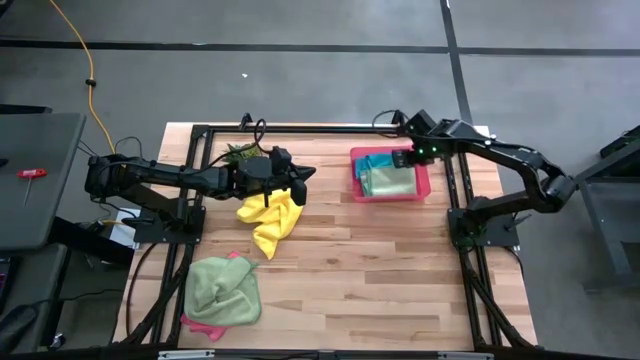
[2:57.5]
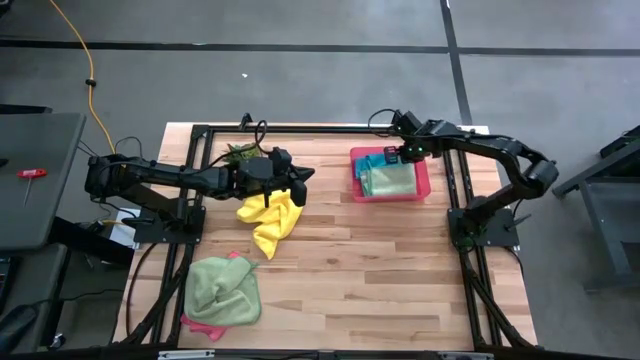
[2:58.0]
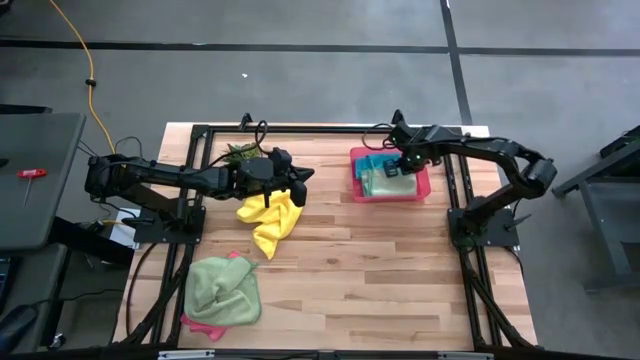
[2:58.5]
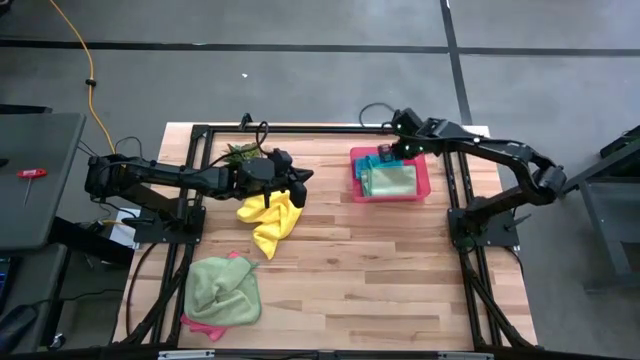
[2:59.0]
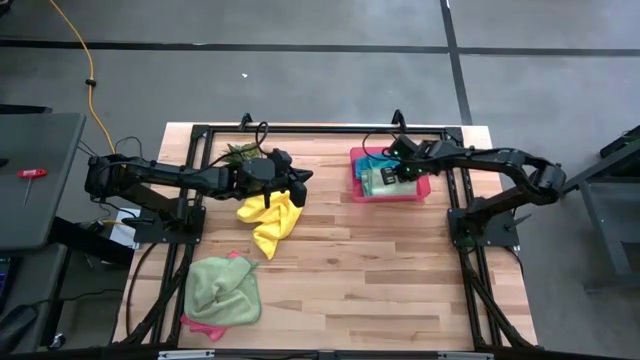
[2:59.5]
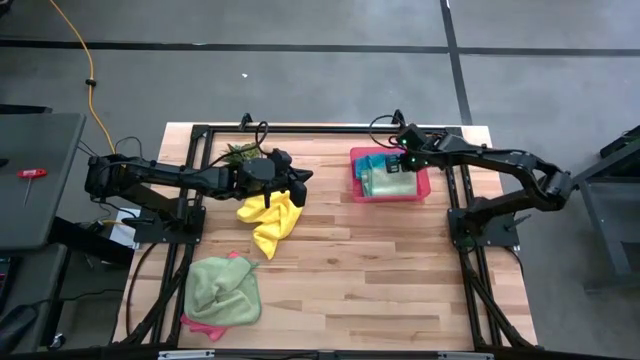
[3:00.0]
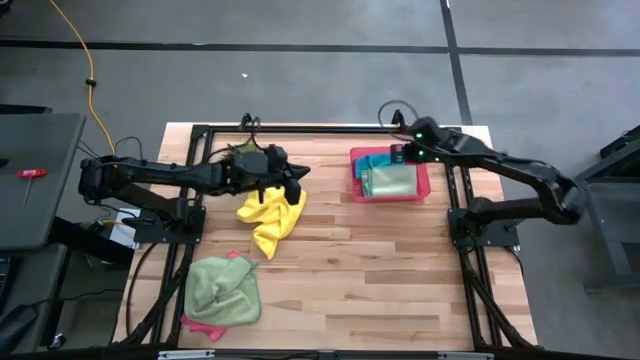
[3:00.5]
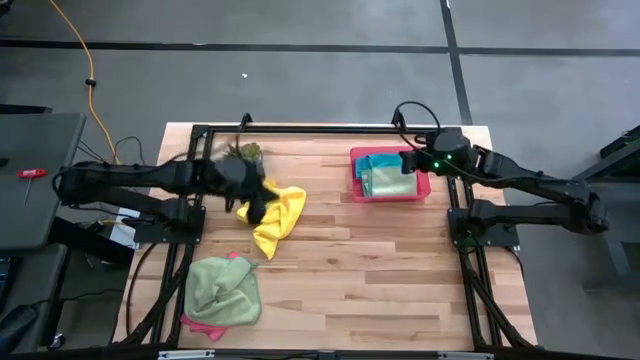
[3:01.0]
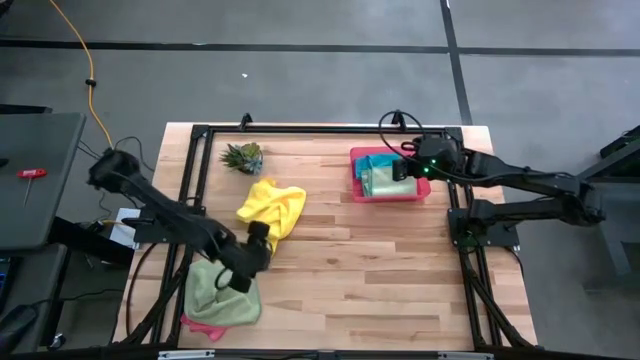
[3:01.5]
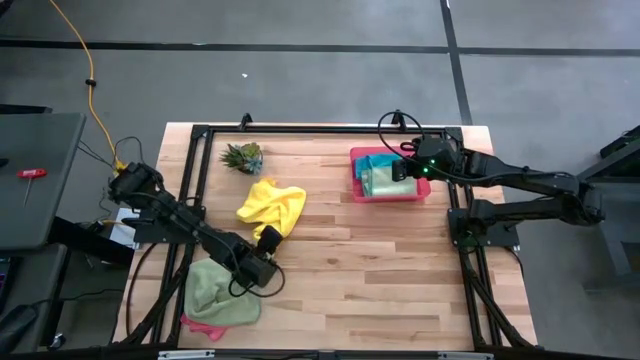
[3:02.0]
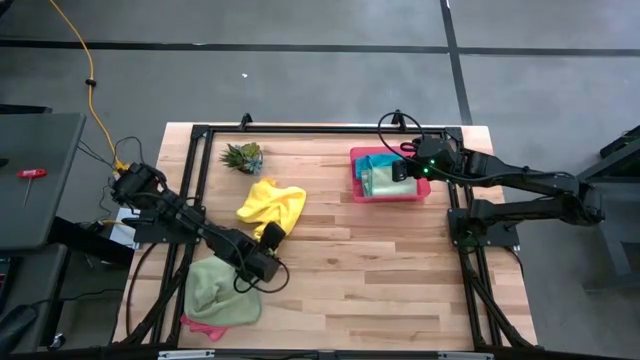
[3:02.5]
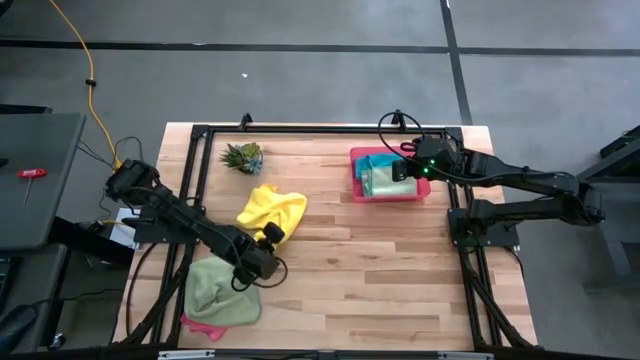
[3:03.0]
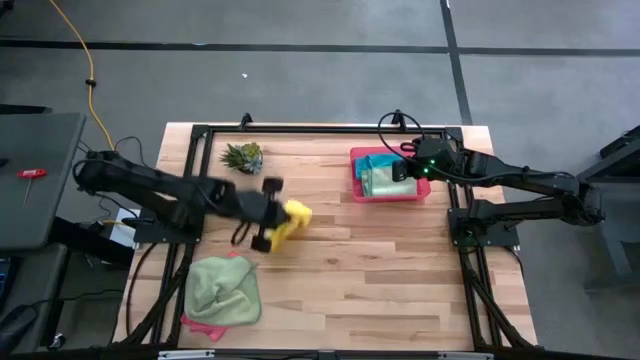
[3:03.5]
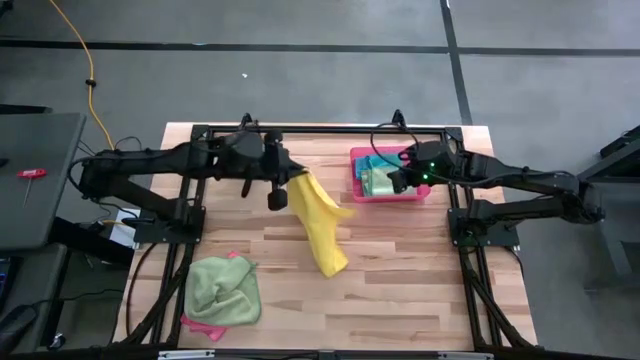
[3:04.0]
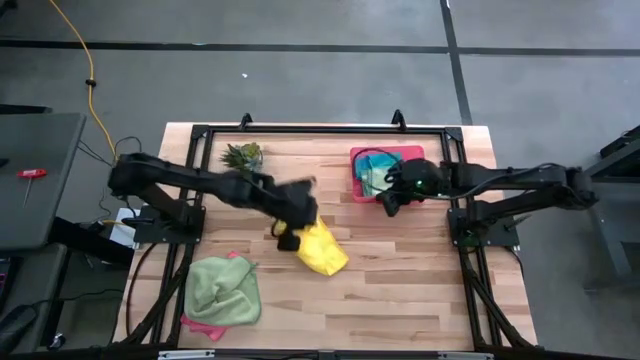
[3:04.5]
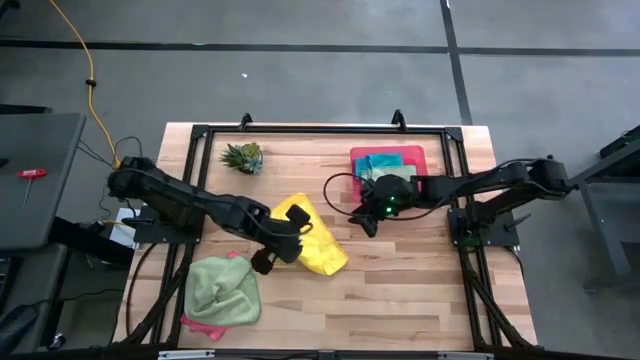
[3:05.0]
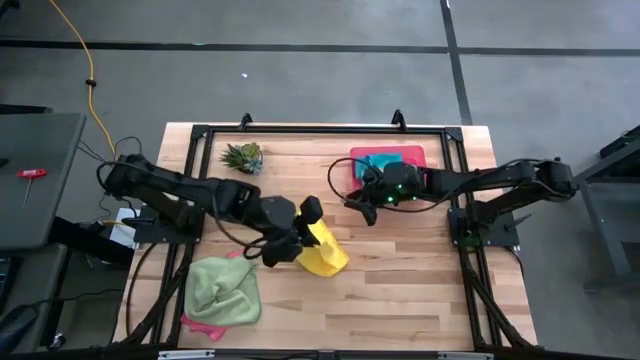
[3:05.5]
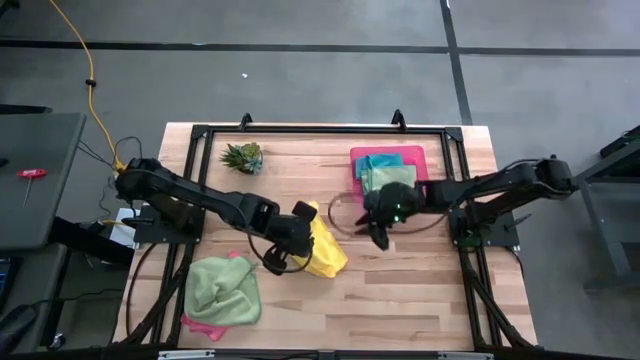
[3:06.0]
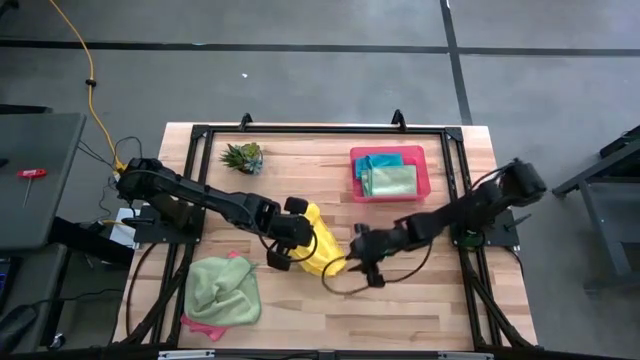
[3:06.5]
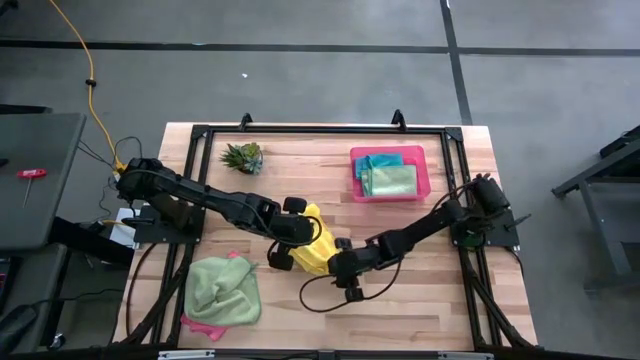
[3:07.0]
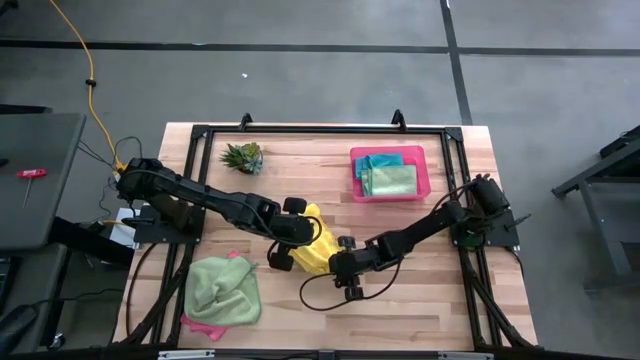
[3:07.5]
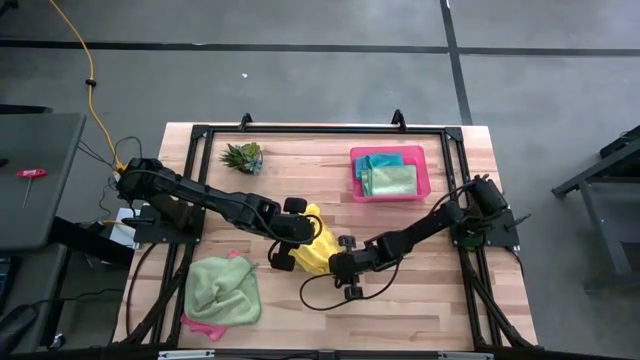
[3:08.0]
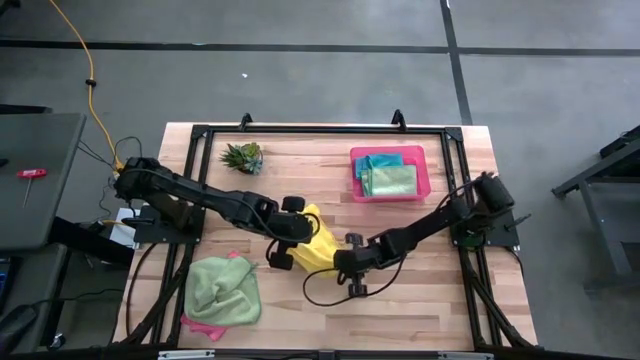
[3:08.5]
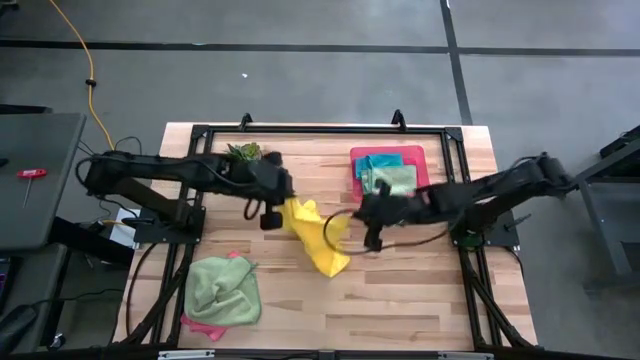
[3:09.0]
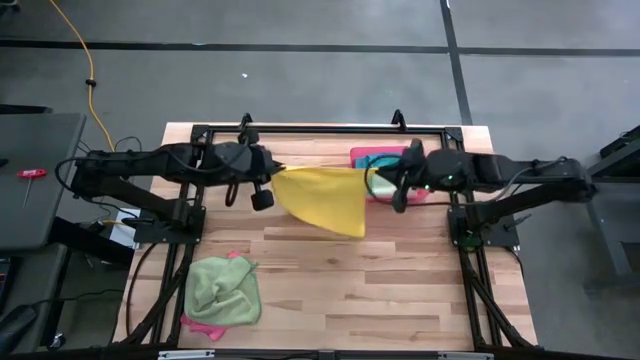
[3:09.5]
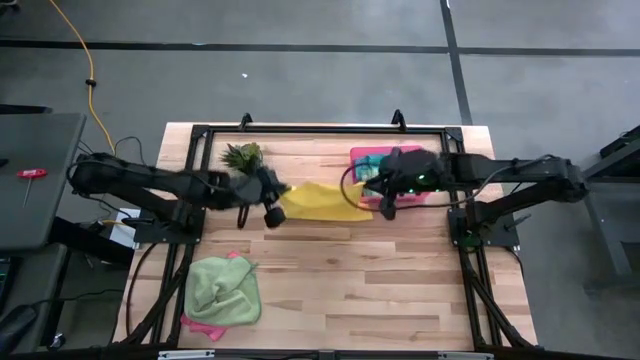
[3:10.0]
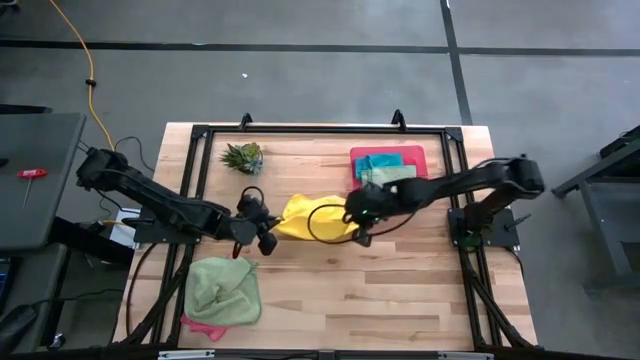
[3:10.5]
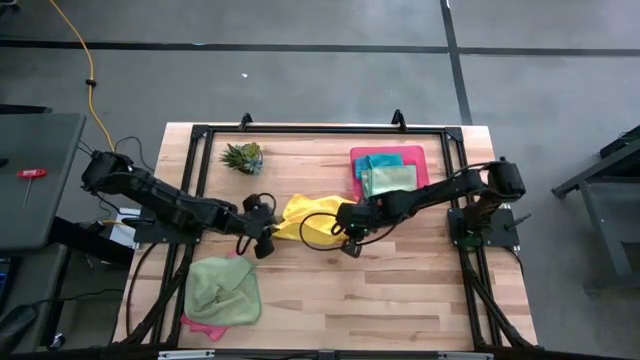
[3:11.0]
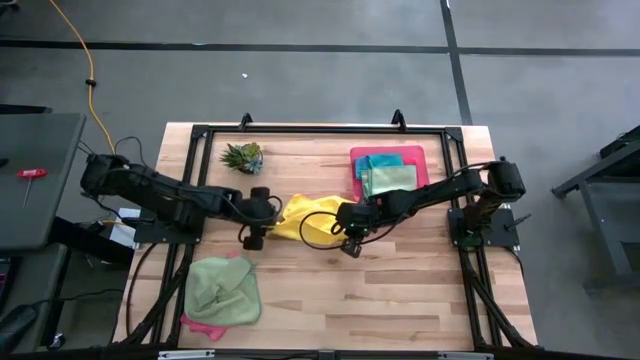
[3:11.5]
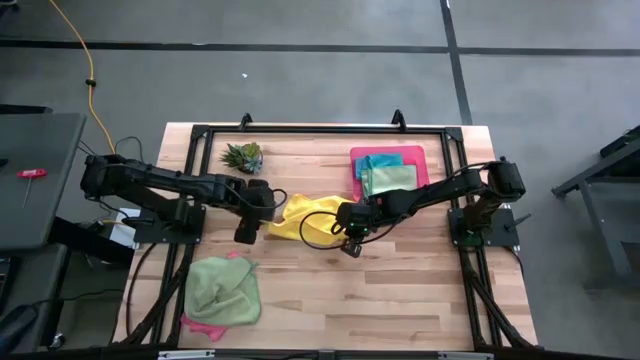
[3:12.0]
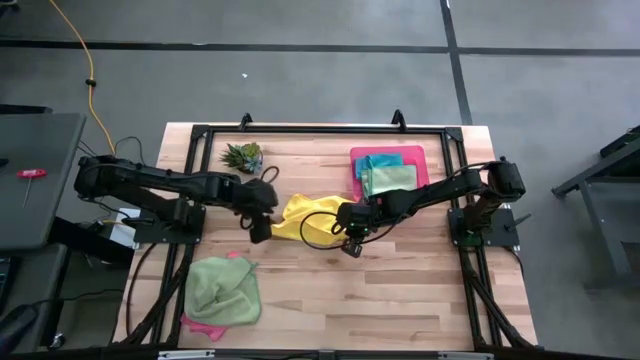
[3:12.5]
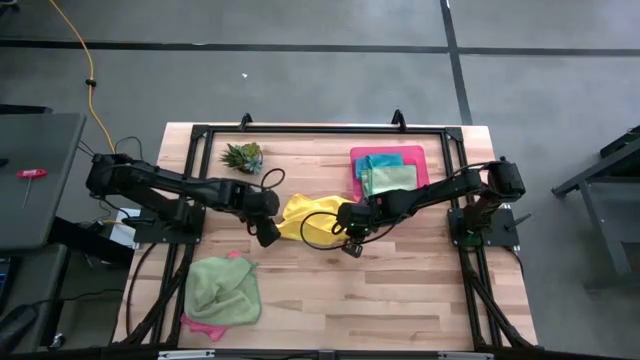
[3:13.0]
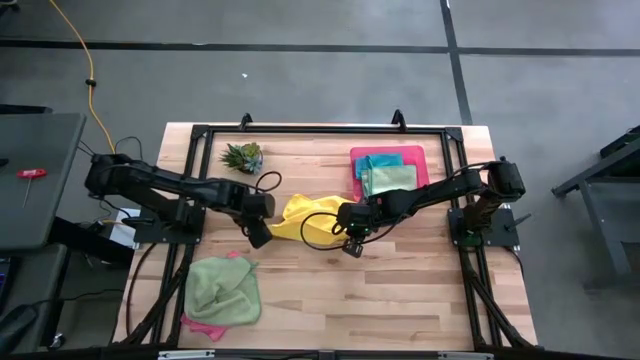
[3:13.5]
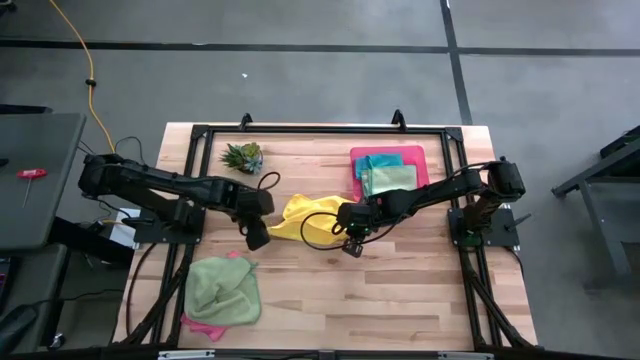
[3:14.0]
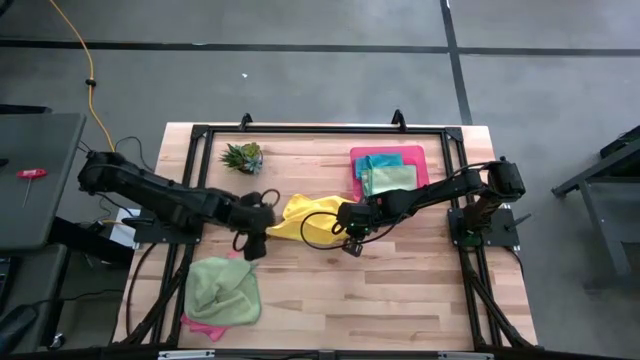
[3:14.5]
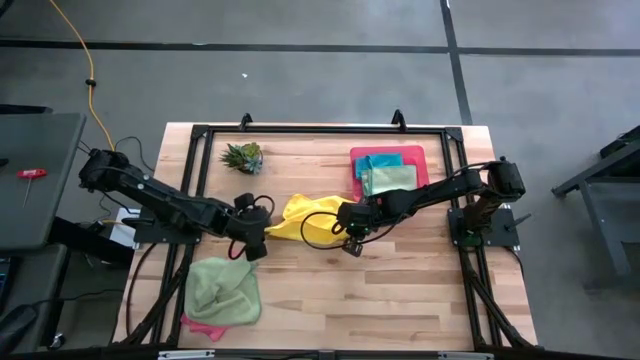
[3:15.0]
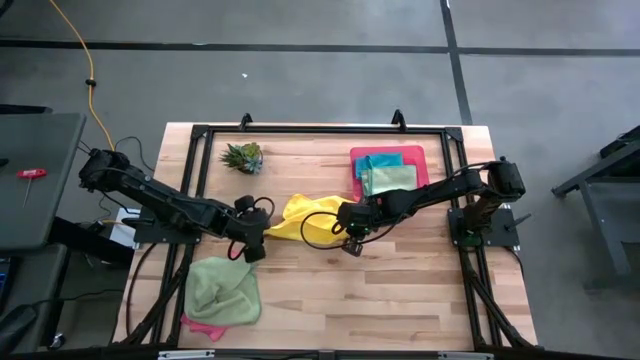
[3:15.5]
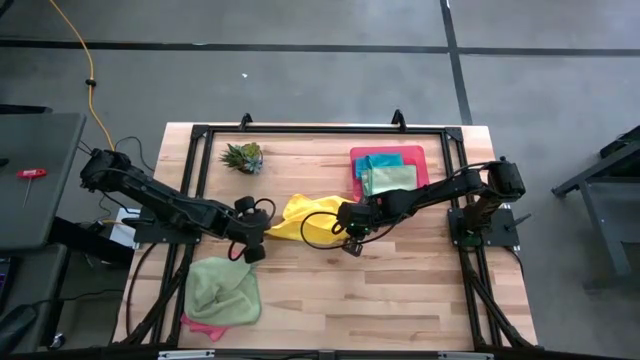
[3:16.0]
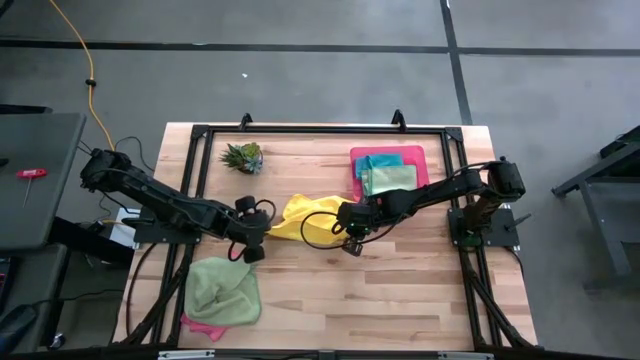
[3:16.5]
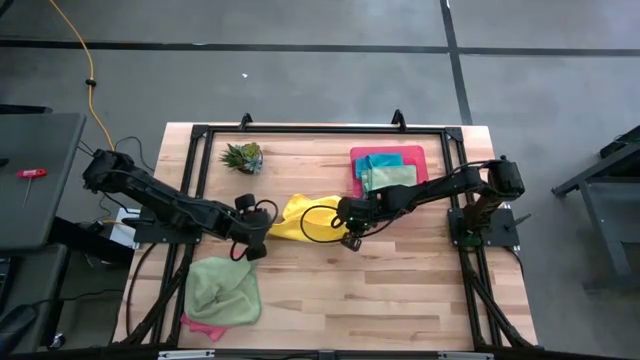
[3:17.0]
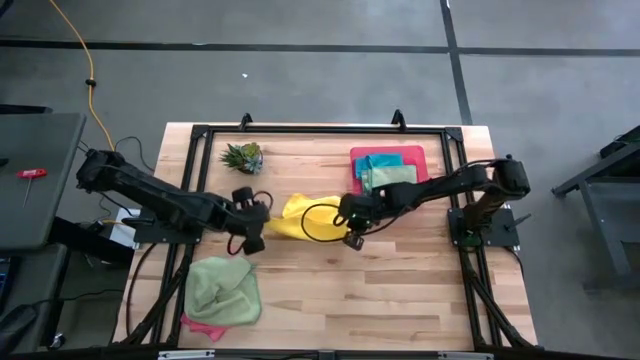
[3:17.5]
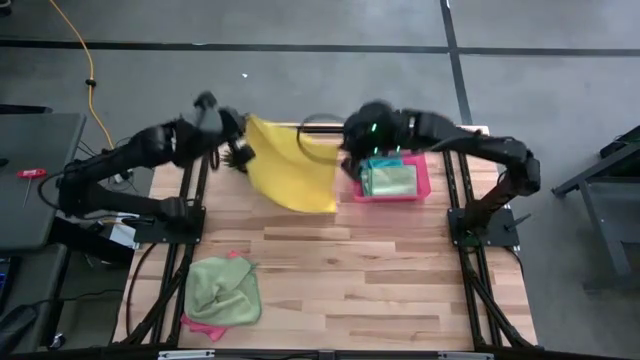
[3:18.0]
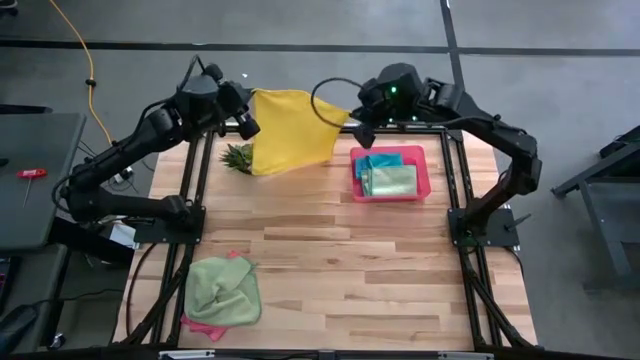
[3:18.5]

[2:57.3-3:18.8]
Task: Fold microfiber towels
Fold the yellow microfiber cloth
